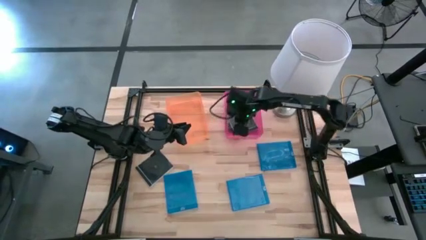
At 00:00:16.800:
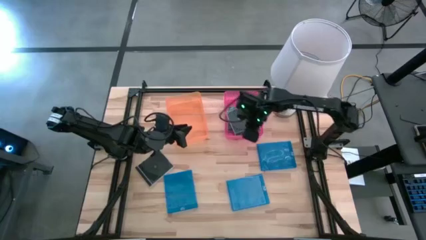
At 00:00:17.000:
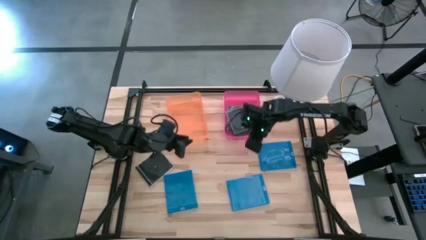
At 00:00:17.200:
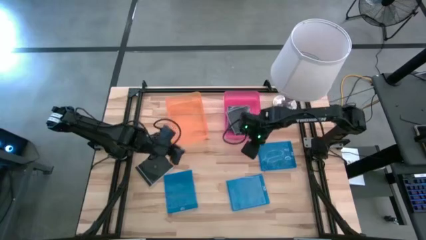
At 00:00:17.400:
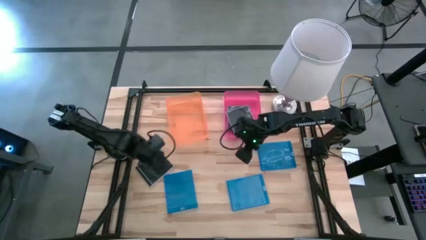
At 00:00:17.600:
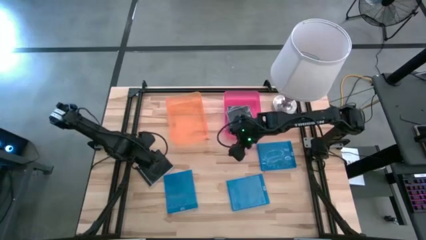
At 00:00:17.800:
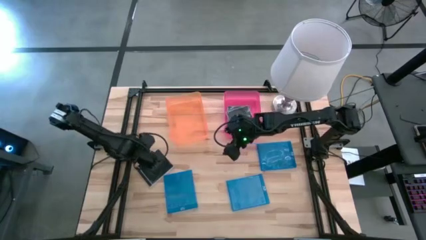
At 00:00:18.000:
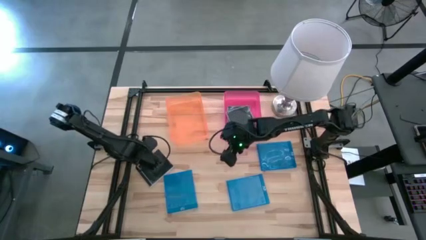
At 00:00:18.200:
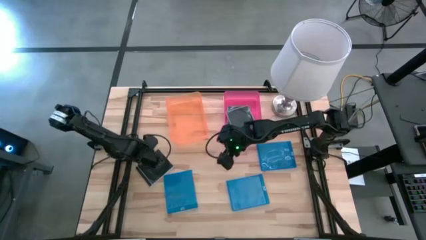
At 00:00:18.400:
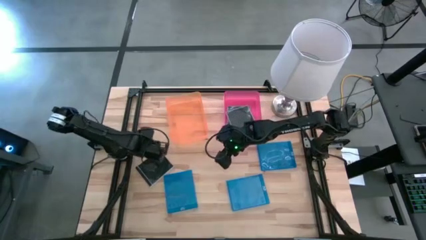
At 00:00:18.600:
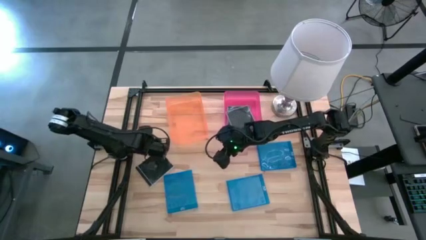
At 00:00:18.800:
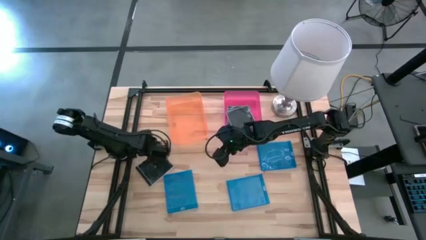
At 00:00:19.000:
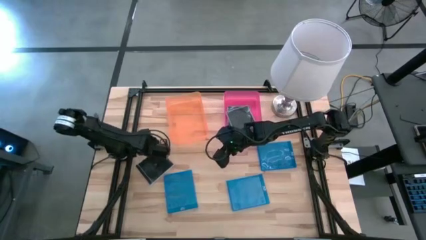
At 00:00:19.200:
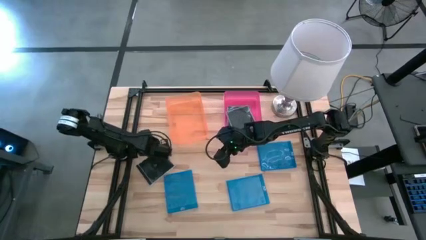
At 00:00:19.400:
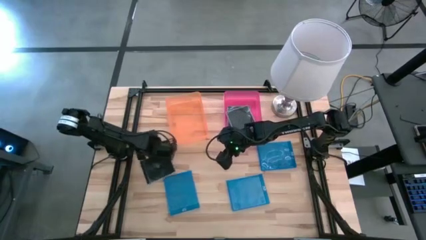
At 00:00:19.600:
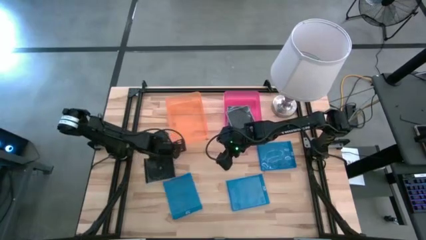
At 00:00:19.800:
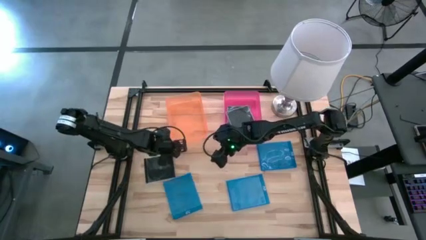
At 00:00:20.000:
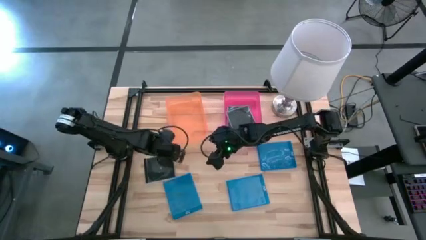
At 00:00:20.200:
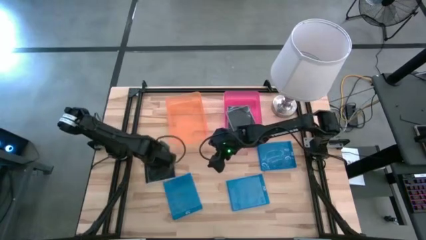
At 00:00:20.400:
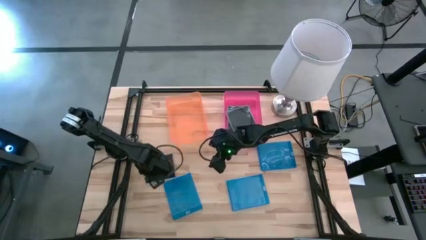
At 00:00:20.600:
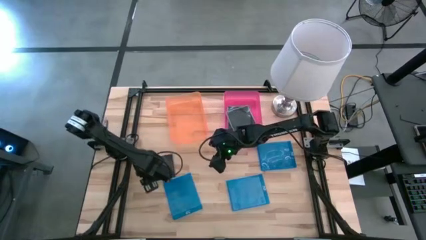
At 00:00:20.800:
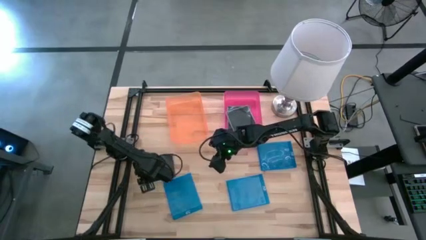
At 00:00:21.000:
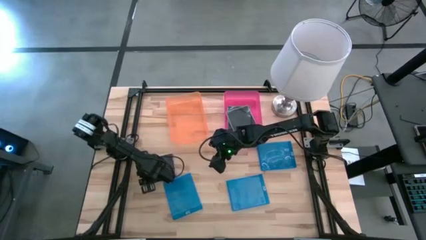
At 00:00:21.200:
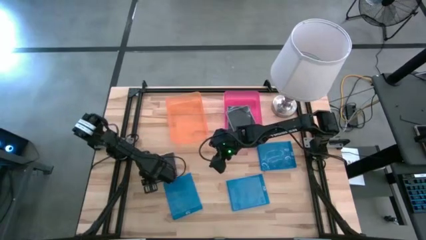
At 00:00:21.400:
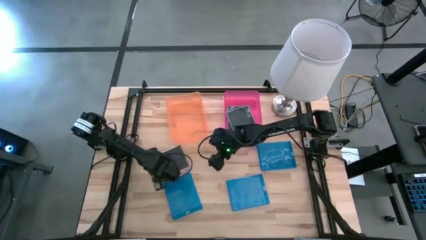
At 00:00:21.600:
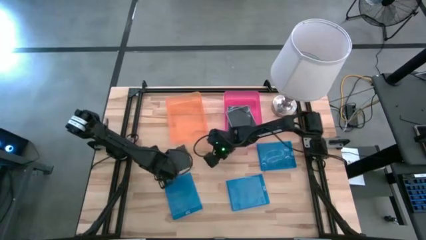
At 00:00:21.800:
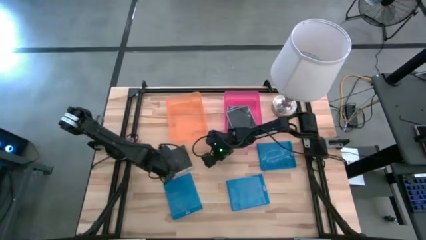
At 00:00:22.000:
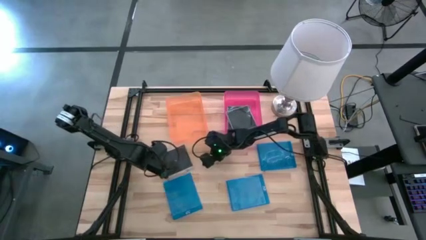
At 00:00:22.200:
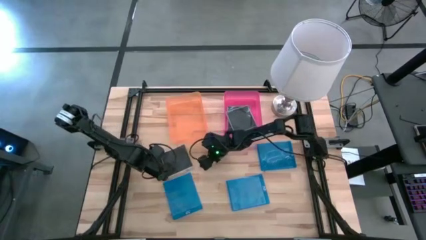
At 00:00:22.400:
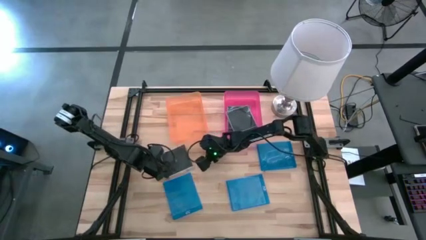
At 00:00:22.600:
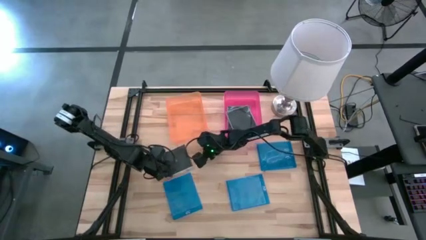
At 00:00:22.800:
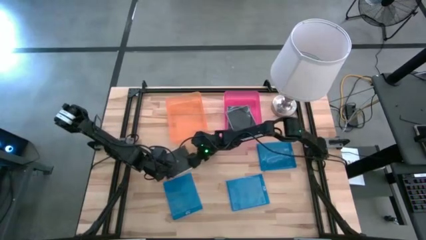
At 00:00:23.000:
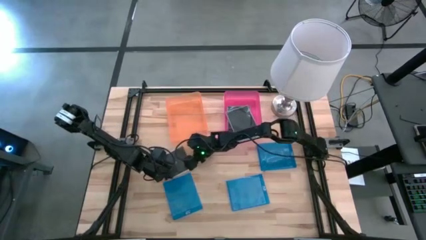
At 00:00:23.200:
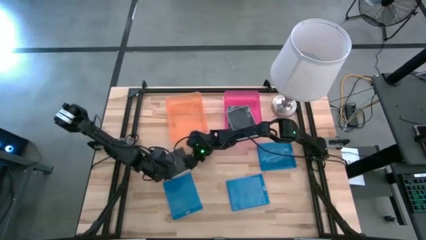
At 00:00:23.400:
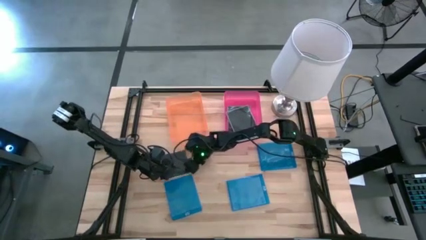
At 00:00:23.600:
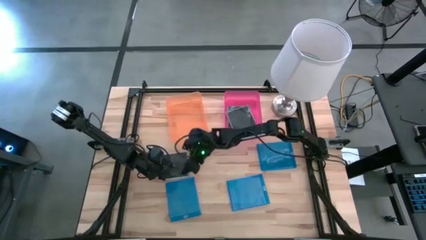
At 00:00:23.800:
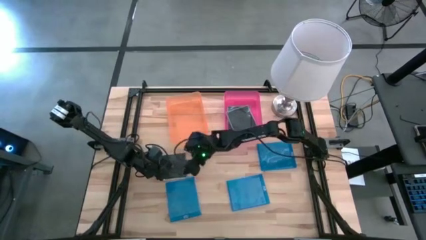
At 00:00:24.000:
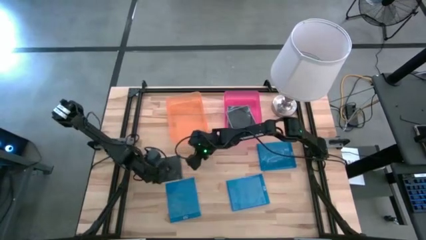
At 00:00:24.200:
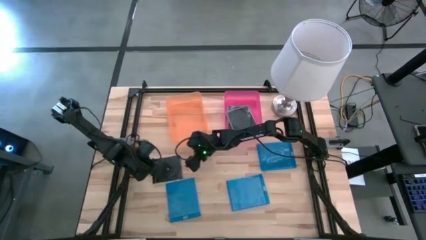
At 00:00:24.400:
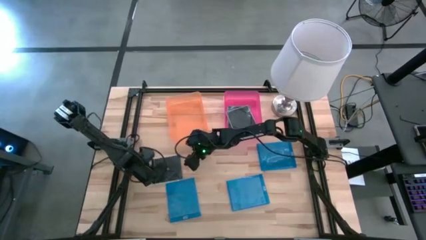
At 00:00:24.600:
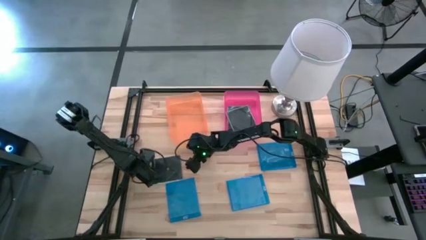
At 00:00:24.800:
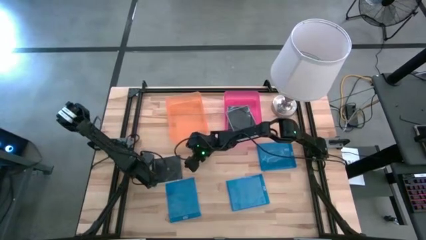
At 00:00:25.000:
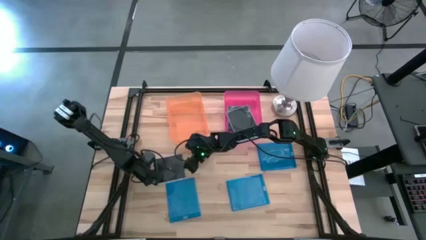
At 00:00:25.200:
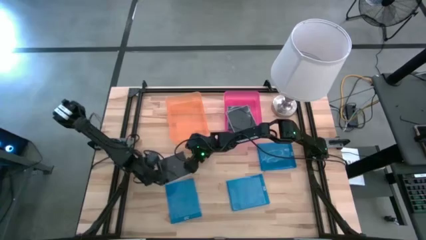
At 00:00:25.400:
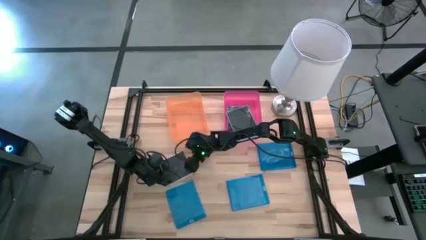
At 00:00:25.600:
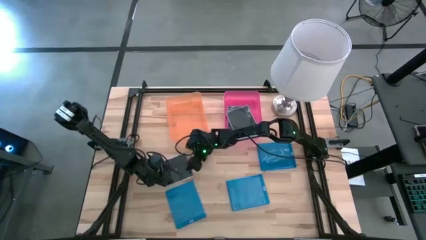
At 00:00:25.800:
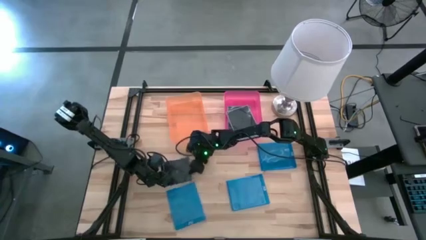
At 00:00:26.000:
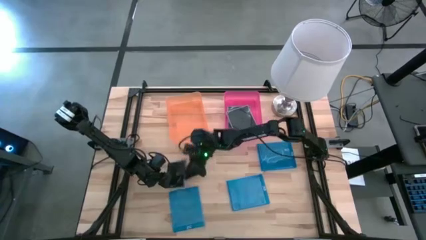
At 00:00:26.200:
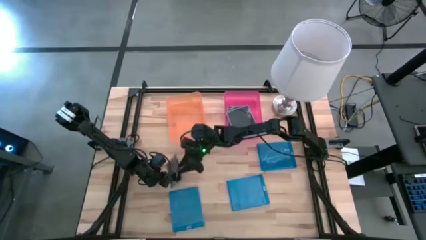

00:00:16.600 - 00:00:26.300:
Task: Pick & place jewel cases by type
Put the black CD case into the pink bin

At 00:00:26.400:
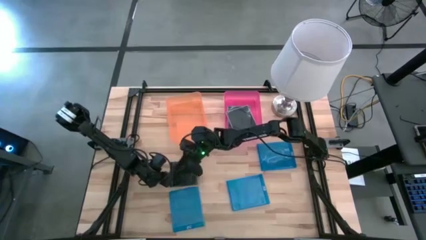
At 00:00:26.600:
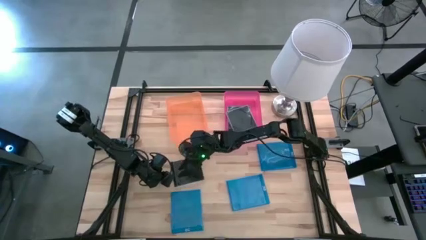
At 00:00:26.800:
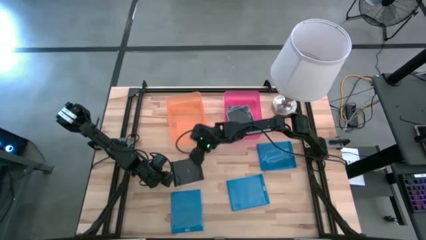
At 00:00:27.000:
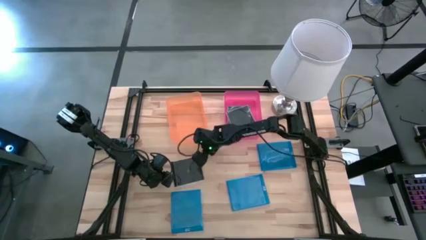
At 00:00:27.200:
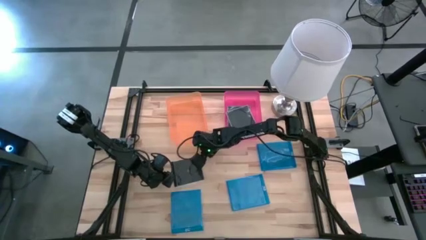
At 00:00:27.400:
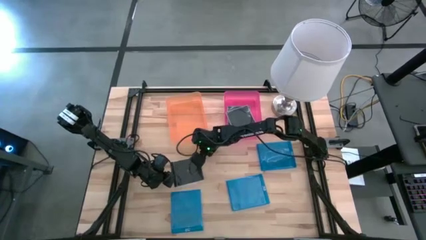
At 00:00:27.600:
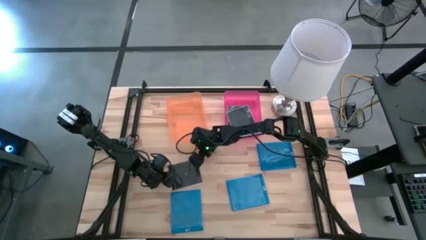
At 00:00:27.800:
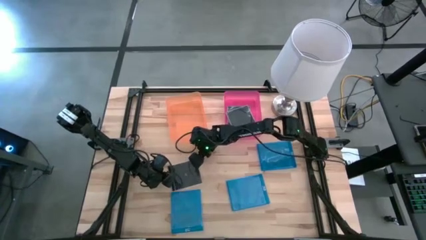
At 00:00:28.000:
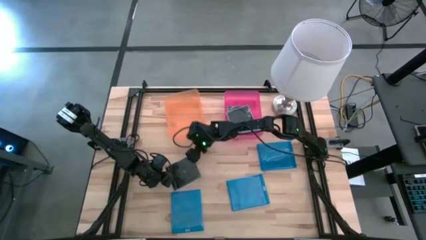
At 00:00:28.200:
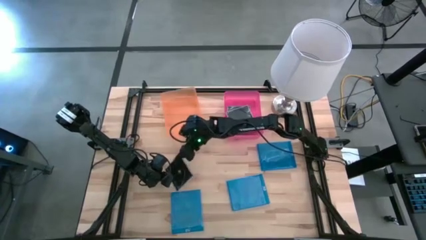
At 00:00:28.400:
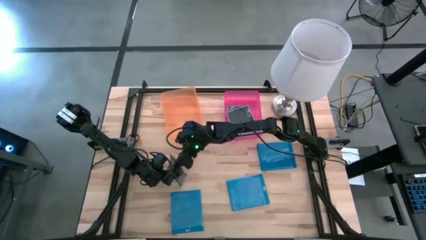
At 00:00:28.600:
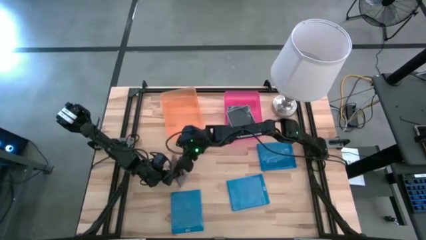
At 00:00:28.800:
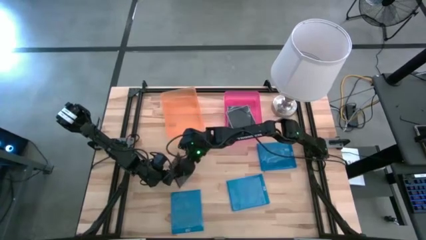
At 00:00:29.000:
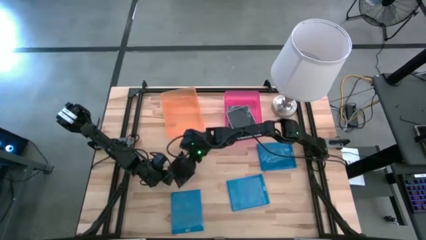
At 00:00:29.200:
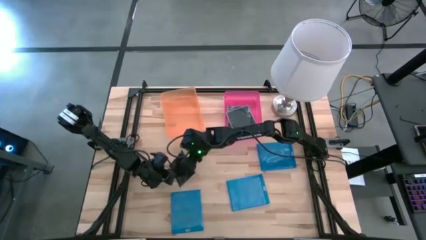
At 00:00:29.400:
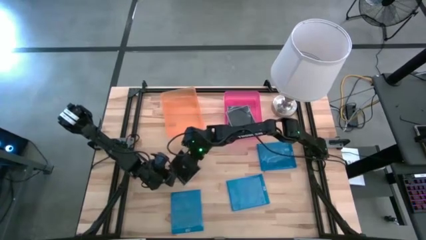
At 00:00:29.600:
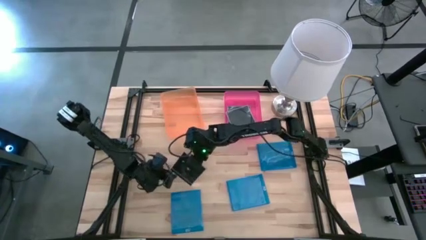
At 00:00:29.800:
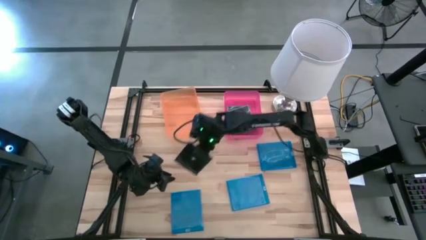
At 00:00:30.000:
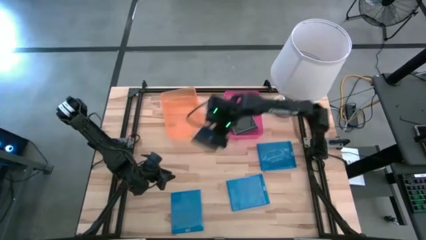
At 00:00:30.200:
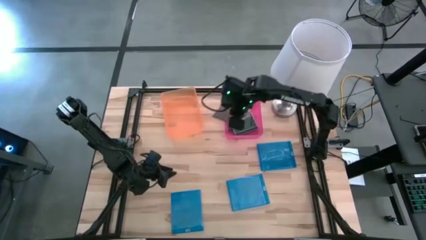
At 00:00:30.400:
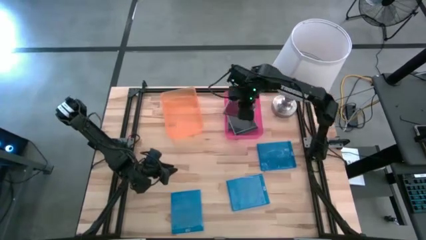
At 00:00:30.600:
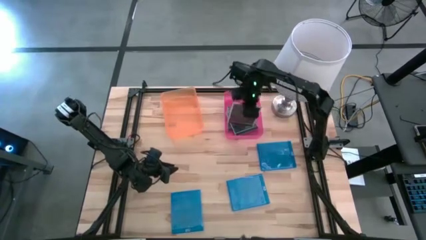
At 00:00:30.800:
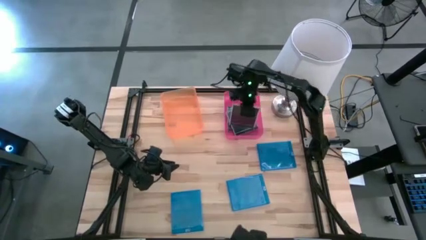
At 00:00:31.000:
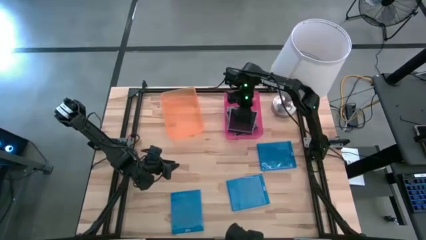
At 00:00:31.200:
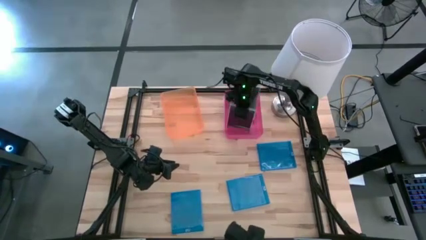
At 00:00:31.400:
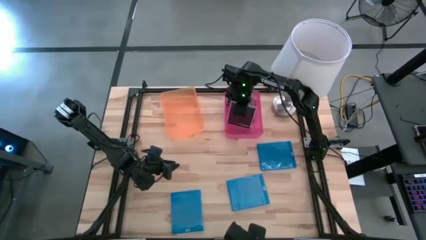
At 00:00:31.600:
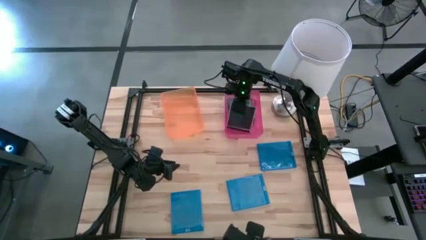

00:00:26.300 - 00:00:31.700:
Put the black CD case into the pink bin
